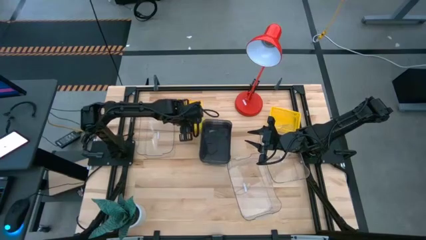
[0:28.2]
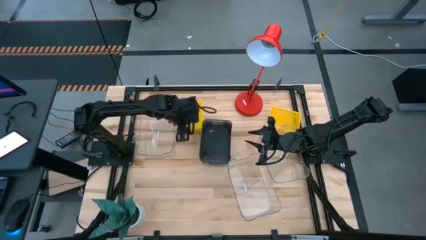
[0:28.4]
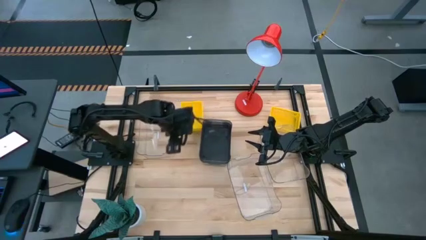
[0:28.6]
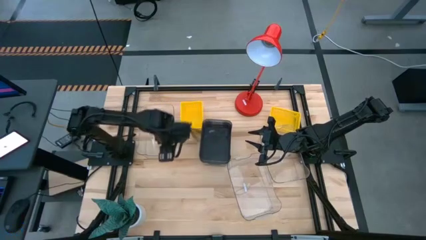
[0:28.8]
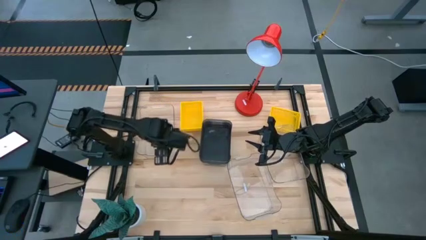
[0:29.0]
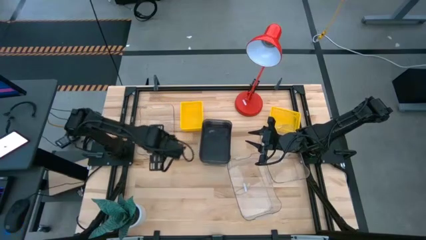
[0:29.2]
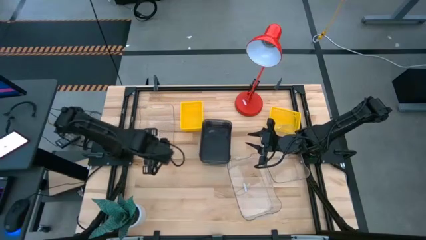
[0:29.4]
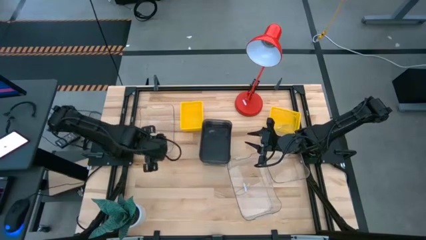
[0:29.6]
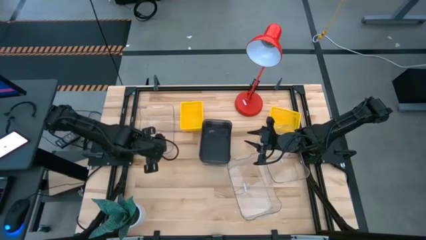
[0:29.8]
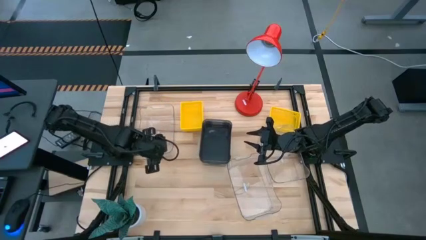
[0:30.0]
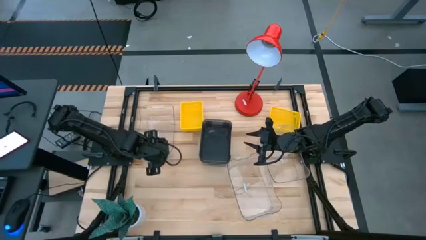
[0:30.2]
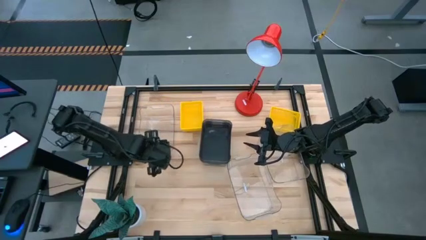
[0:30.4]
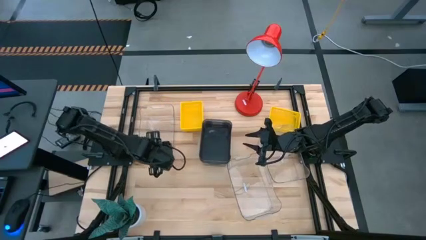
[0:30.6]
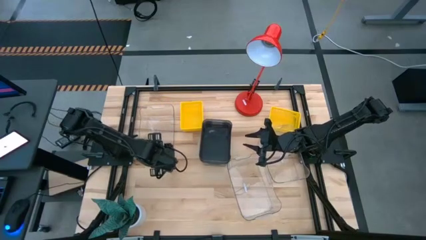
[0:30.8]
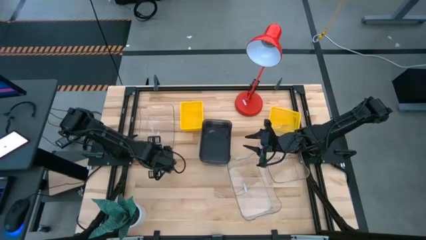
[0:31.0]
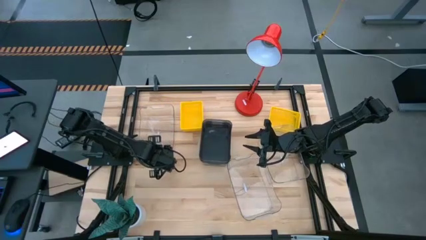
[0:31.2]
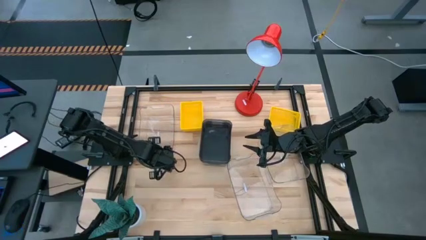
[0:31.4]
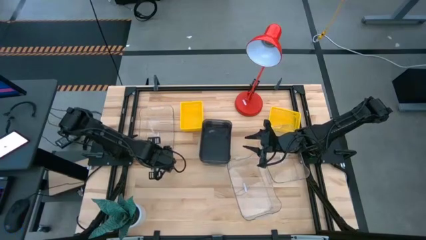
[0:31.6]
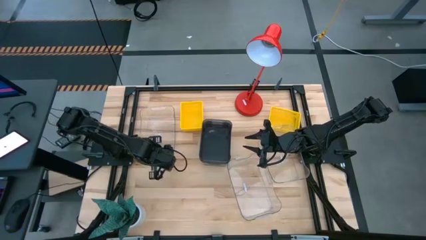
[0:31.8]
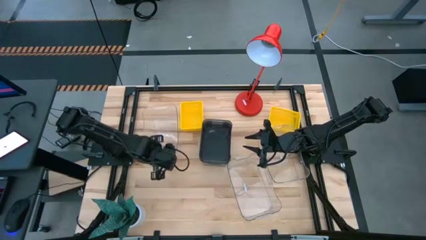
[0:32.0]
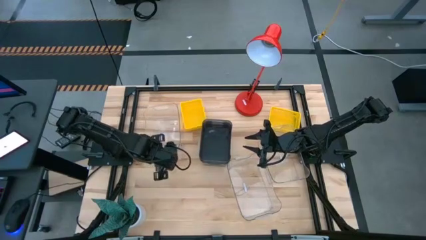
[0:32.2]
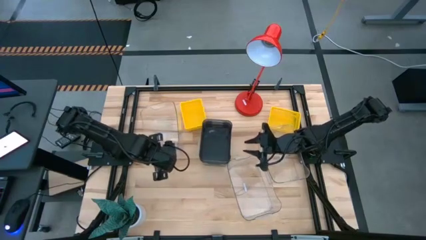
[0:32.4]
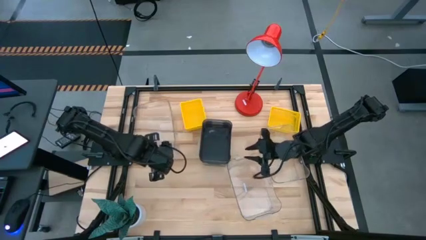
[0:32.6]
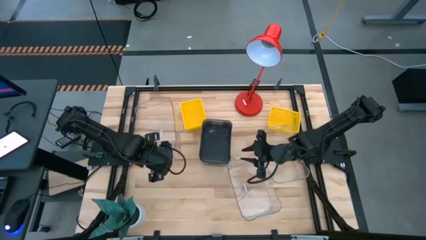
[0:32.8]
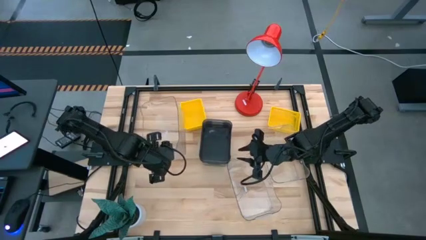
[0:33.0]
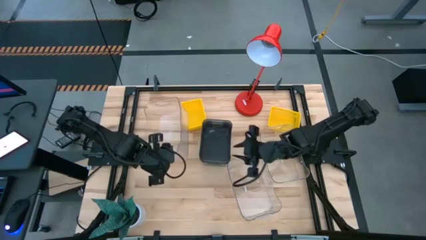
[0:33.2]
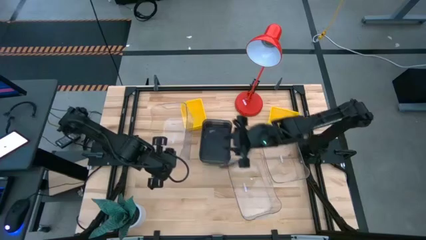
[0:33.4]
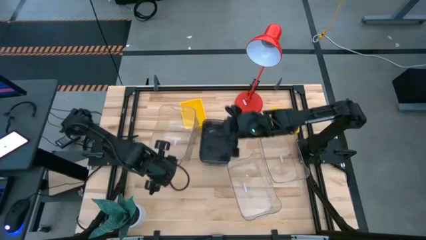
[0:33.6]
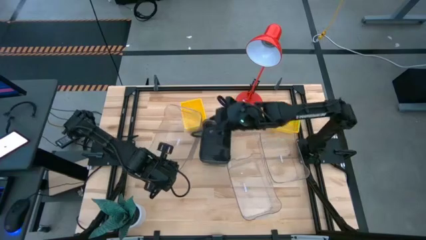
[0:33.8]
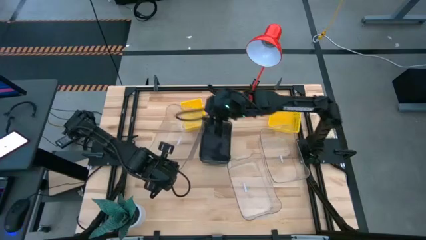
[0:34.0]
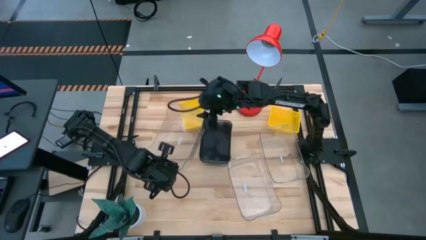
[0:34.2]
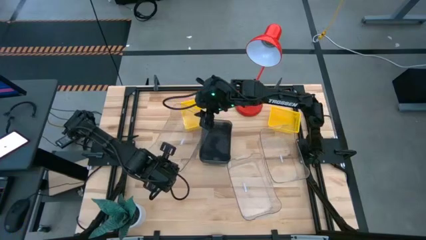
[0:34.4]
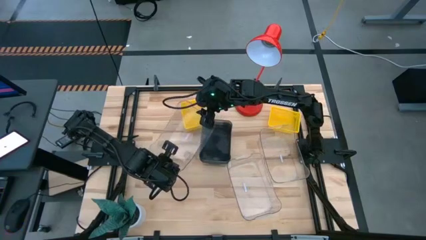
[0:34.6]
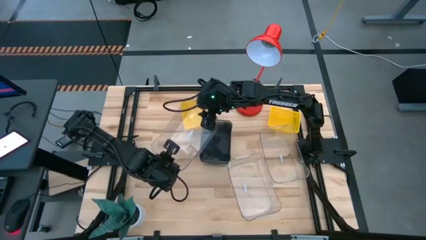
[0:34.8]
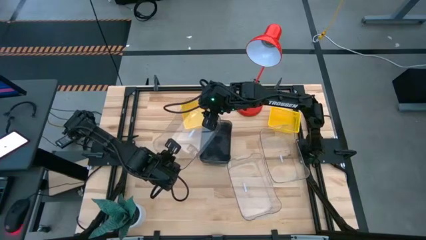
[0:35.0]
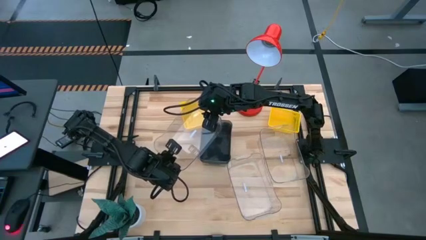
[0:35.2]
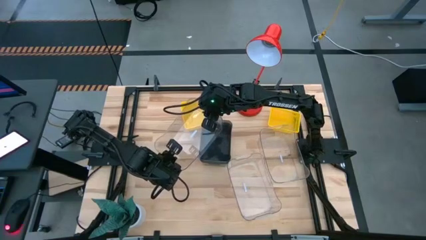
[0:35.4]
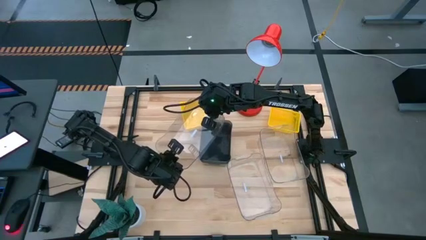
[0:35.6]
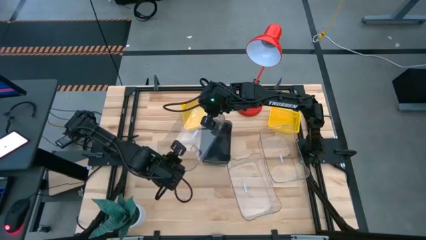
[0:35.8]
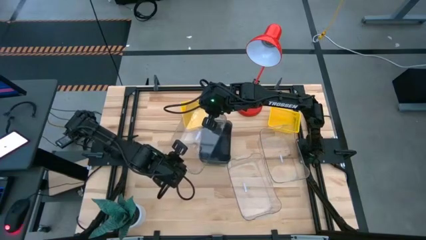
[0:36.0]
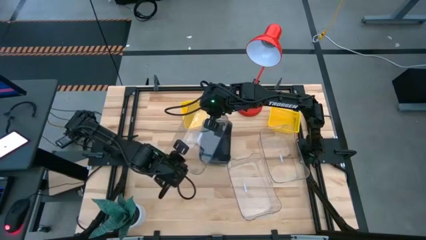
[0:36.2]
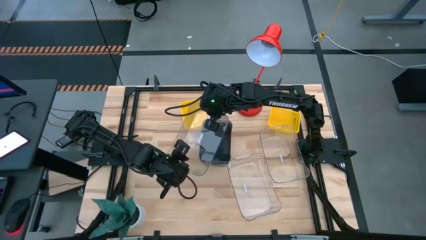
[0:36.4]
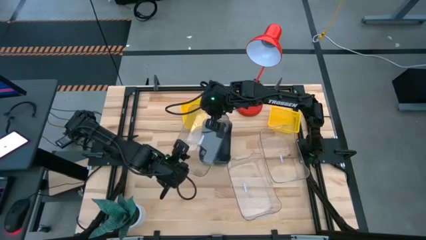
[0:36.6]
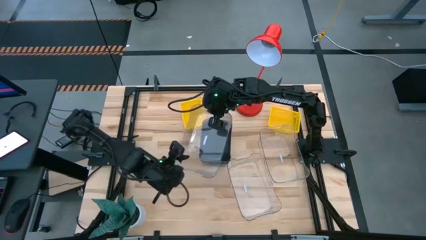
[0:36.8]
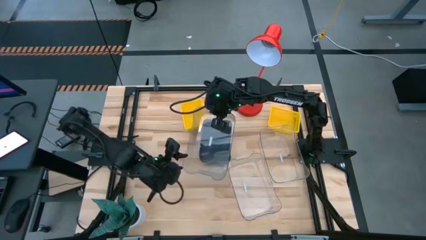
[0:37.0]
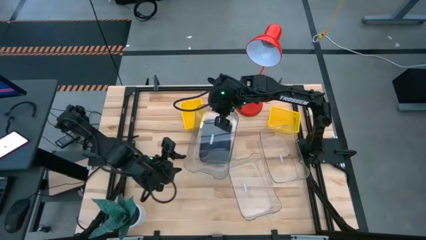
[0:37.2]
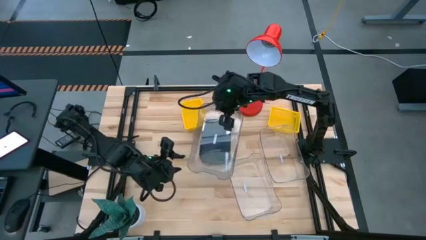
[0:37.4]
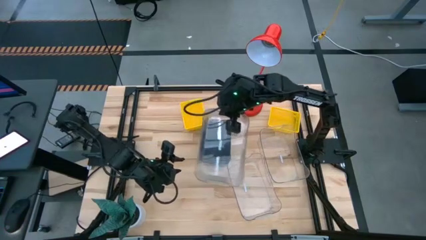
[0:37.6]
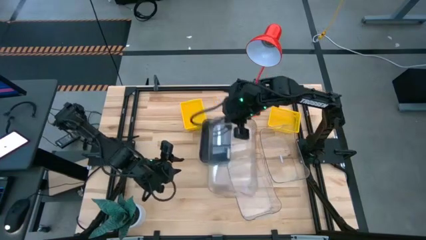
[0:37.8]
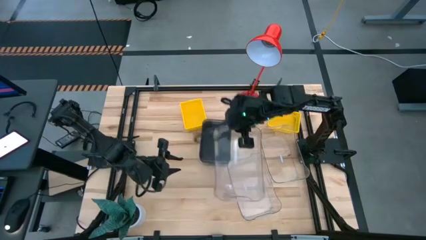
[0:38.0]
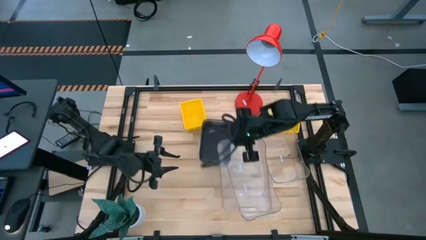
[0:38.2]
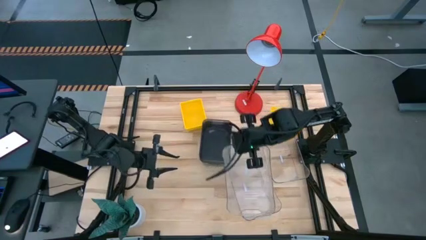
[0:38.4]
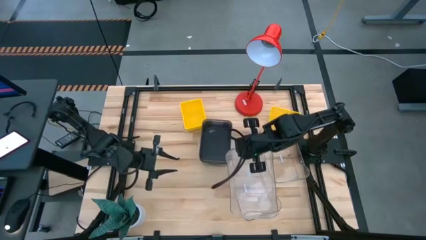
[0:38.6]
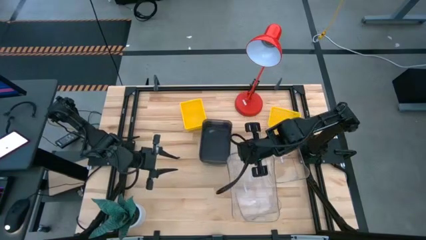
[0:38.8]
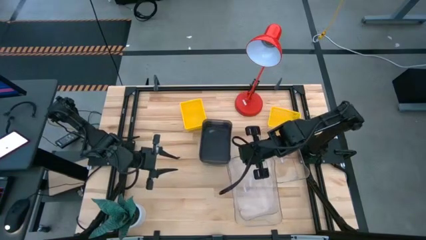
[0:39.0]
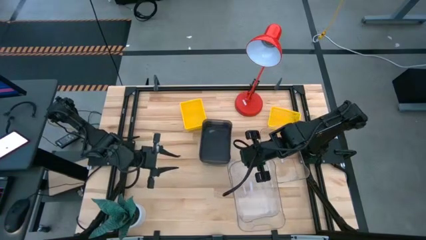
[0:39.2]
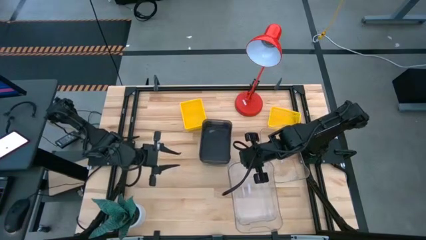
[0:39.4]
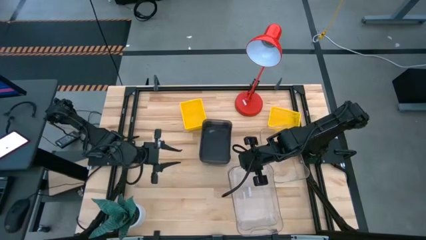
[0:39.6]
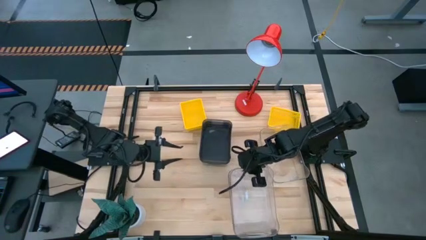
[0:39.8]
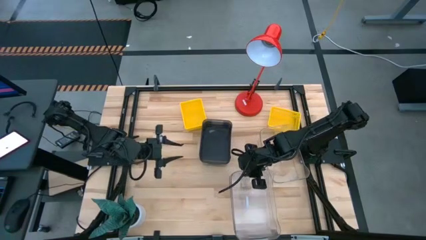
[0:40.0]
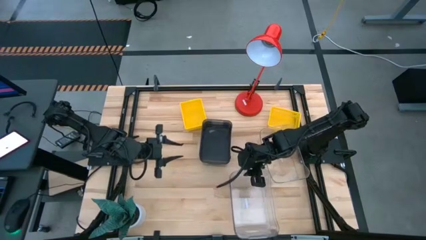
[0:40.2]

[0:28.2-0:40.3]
Stack the top transparent bin on the bottom transparent bin

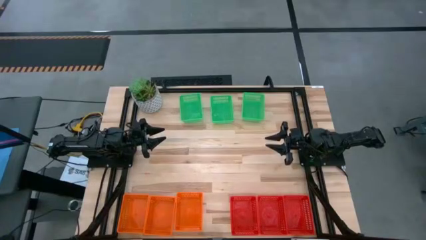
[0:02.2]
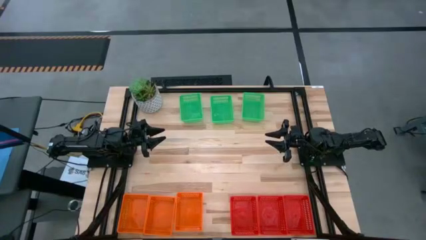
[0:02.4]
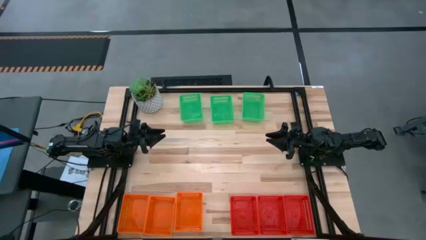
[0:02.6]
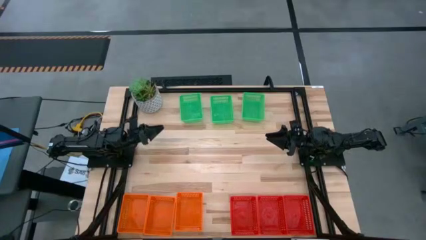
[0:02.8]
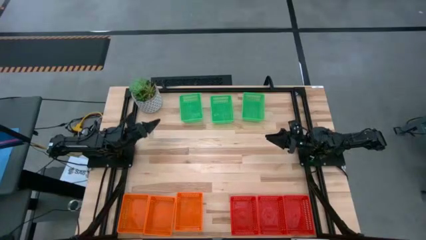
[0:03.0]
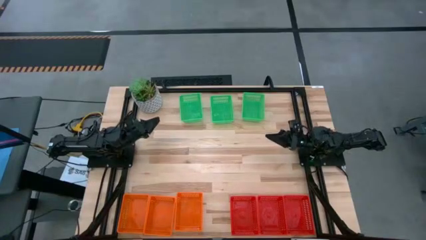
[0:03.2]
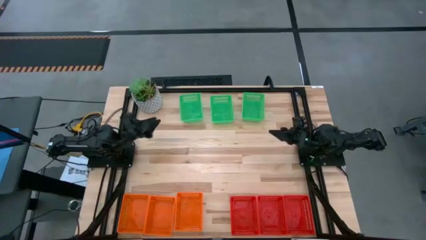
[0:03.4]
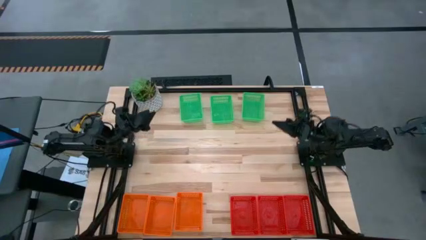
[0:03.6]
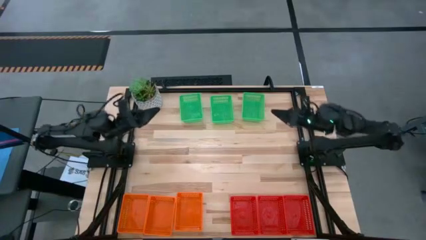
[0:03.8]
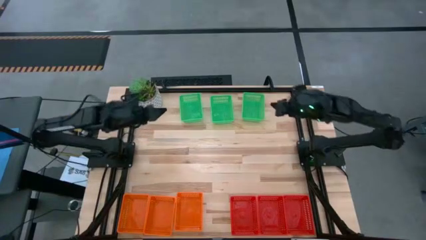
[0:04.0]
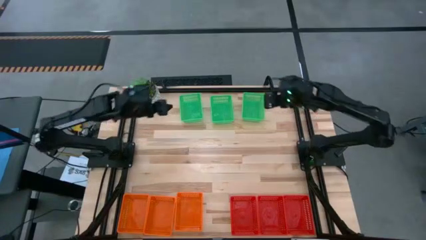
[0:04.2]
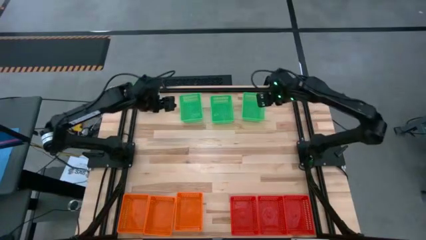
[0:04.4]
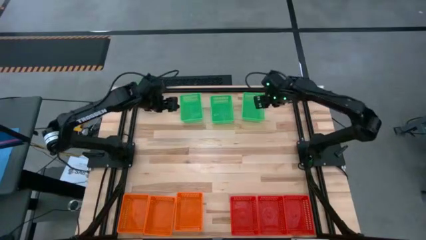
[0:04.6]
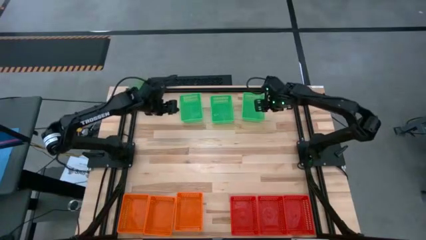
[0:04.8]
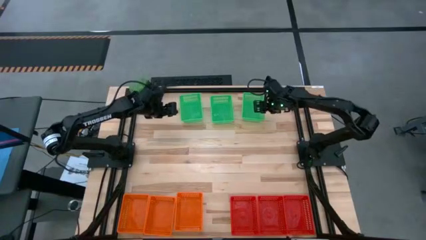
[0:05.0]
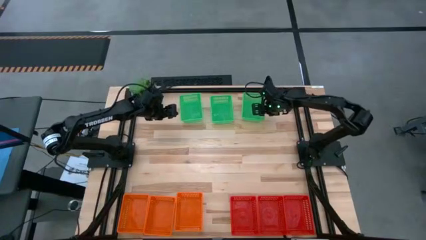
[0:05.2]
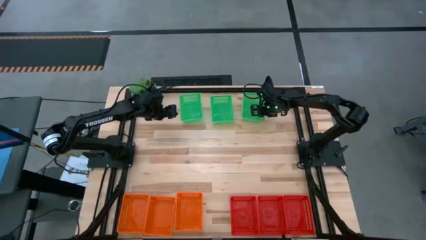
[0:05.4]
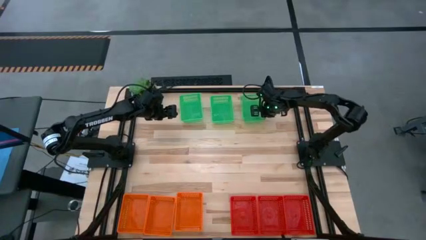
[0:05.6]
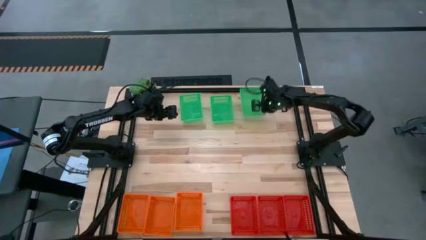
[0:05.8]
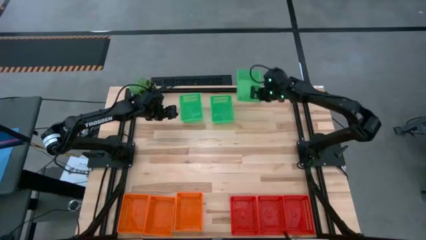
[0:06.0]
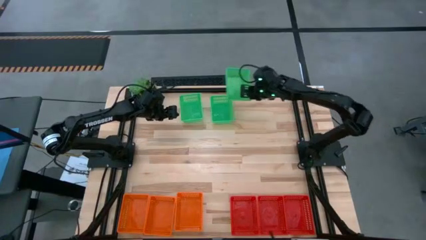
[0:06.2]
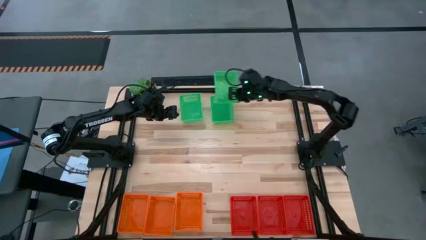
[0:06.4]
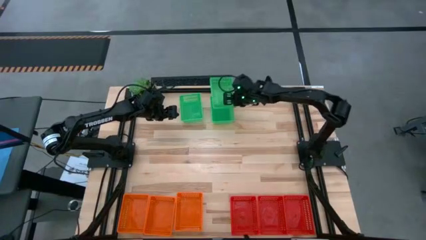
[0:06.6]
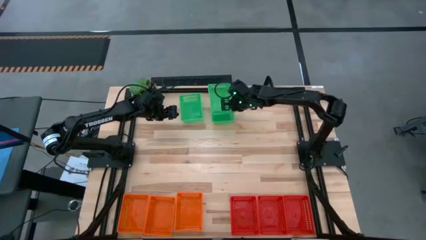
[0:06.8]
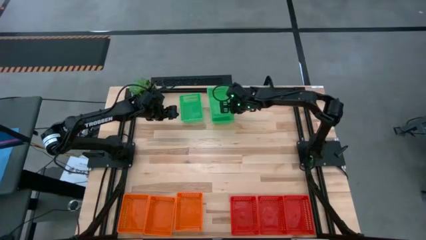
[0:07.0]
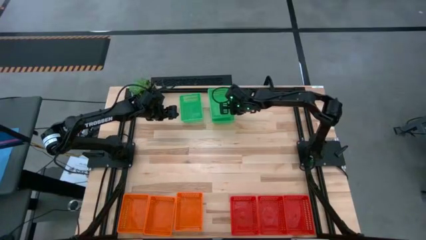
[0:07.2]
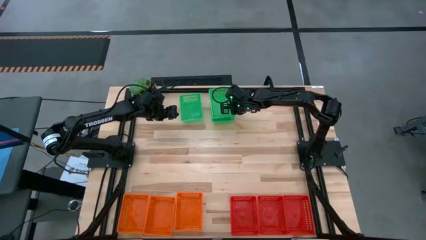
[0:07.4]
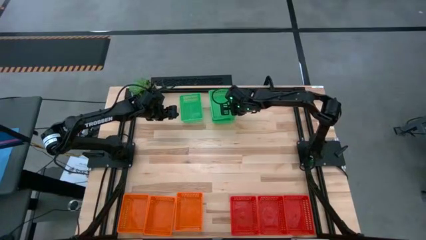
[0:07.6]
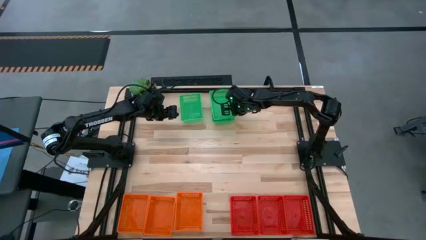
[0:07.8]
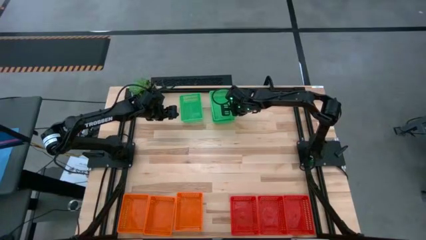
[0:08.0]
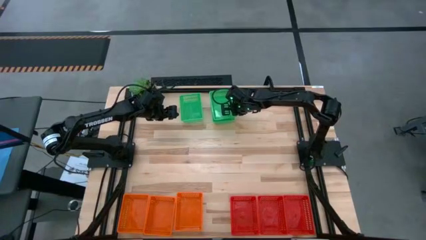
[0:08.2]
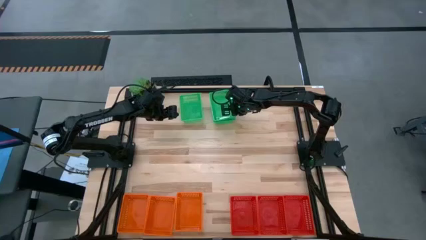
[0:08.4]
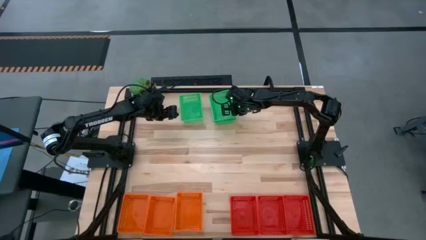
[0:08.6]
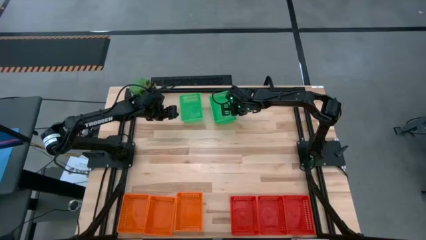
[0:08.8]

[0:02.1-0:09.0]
Stack the top right green bin on the middle green bin
